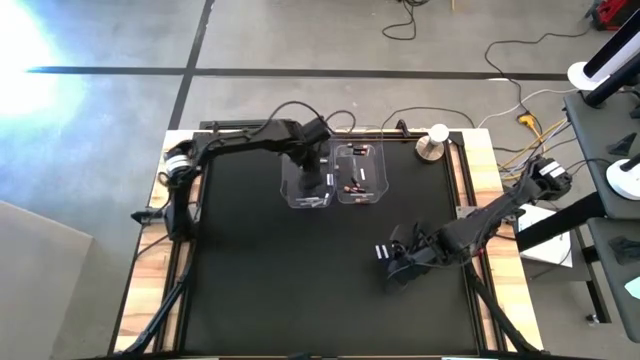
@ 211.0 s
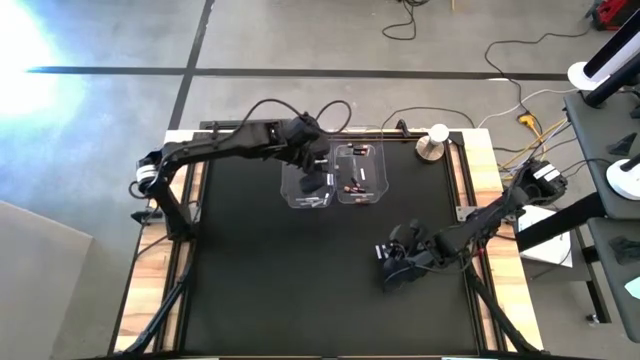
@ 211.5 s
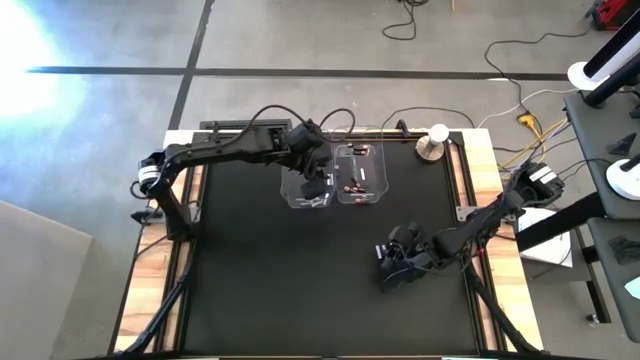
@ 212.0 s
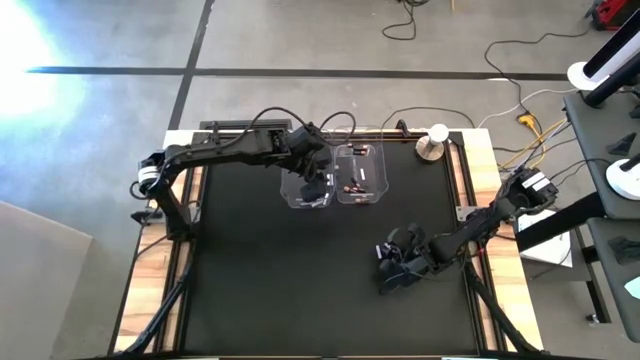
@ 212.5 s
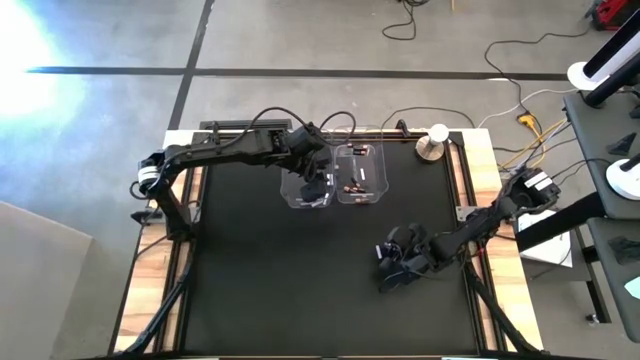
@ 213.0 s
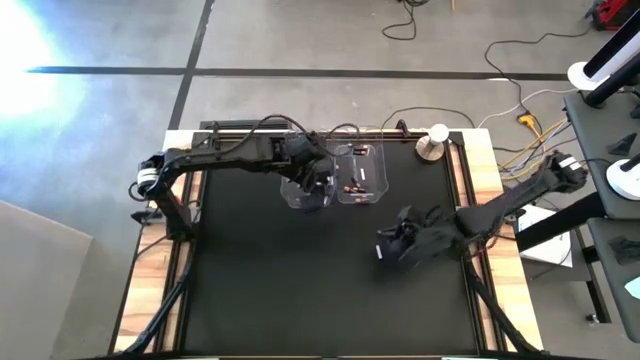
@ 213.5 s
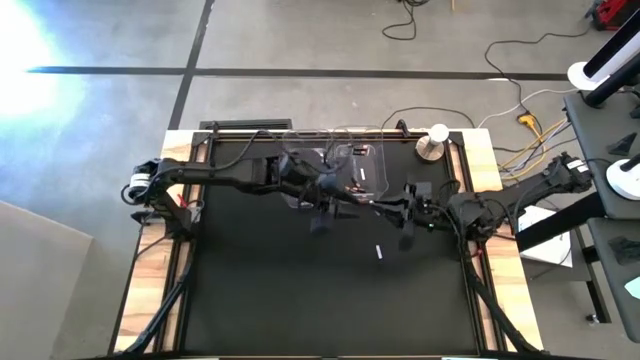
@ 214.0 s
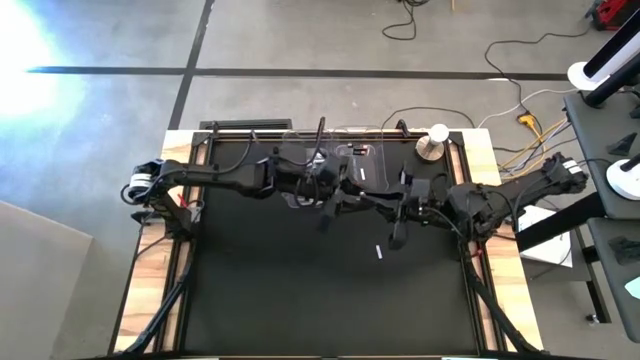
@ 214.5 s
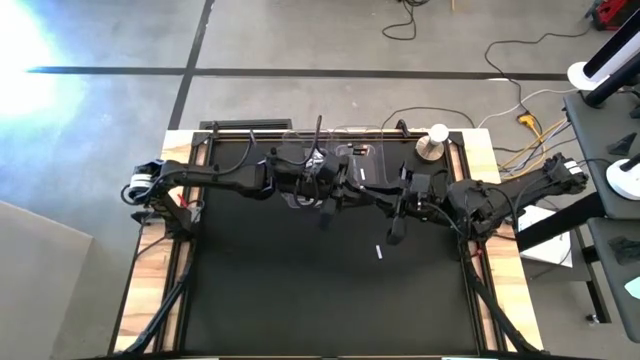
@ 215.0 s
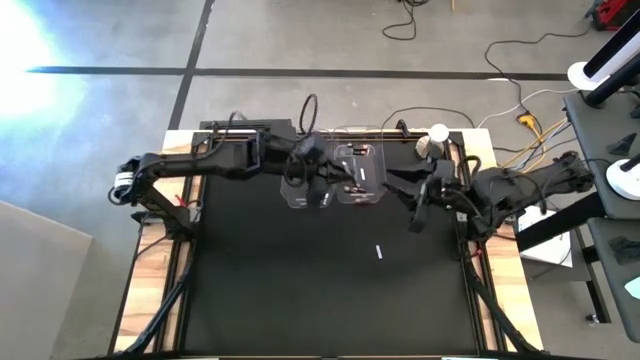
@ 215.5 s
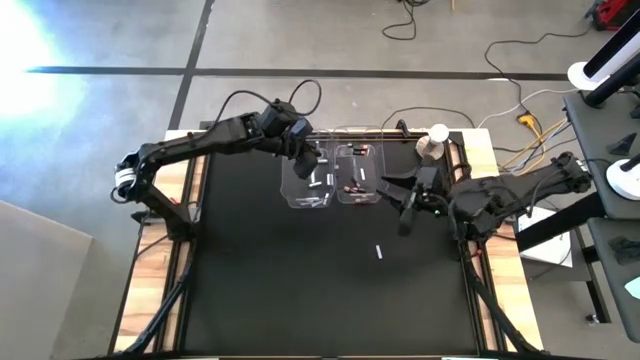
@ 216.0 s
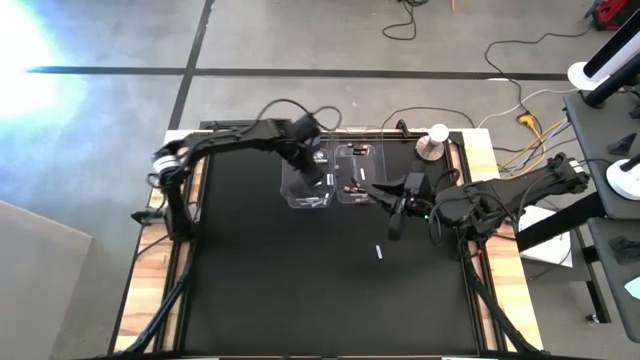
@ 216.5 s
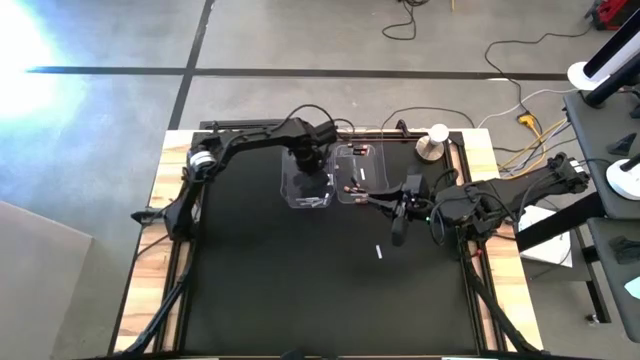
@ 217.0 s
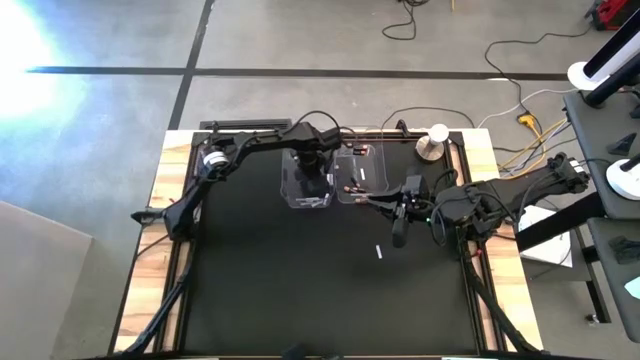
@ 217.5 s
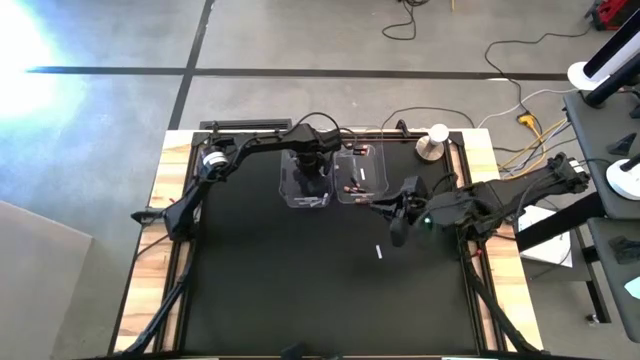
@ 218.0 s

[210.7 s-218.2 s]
Task: Sort batteries
Put the white battery into the left transparent bin

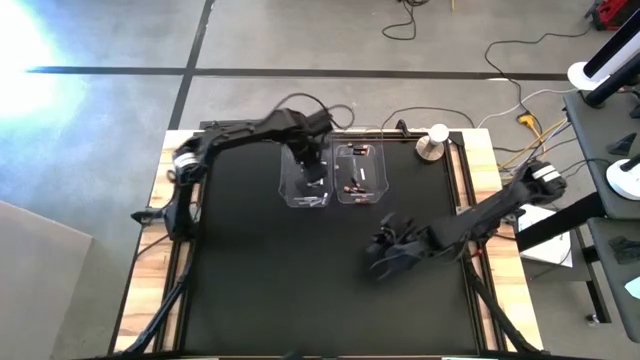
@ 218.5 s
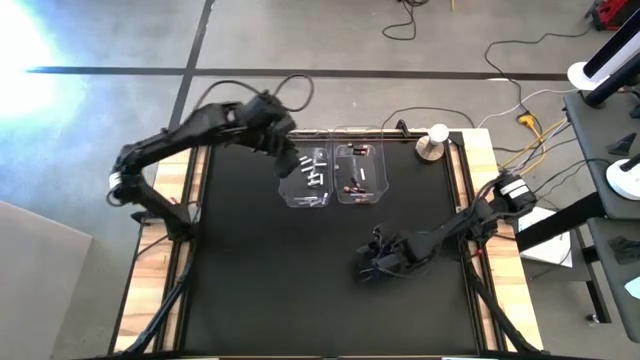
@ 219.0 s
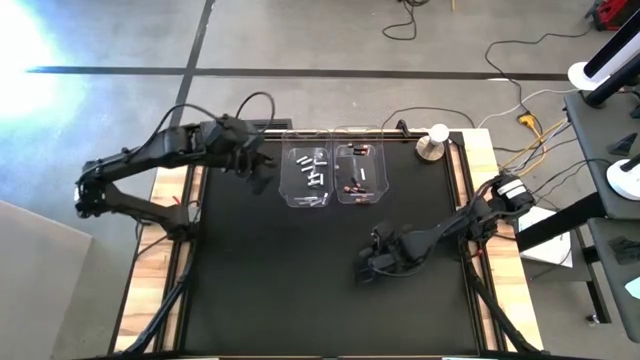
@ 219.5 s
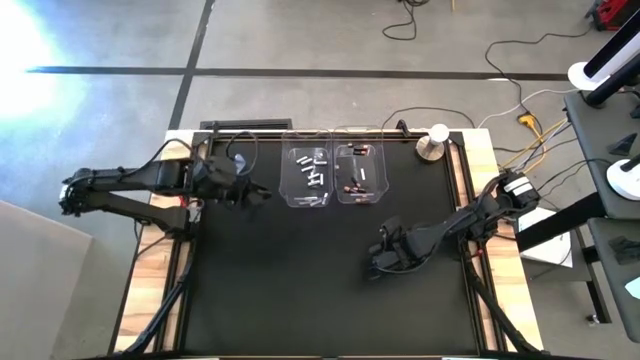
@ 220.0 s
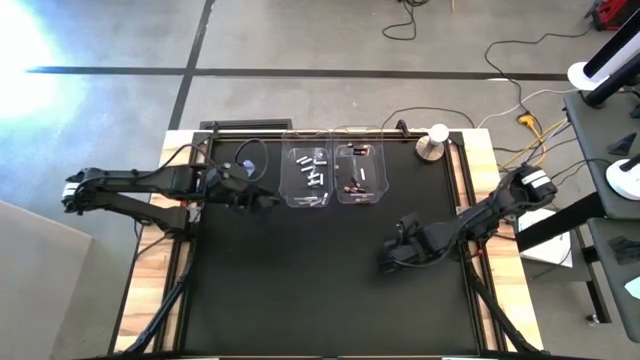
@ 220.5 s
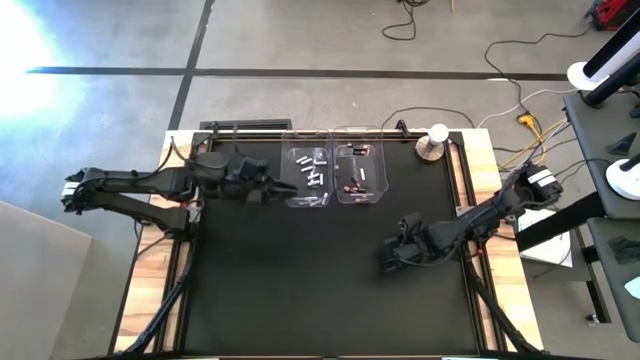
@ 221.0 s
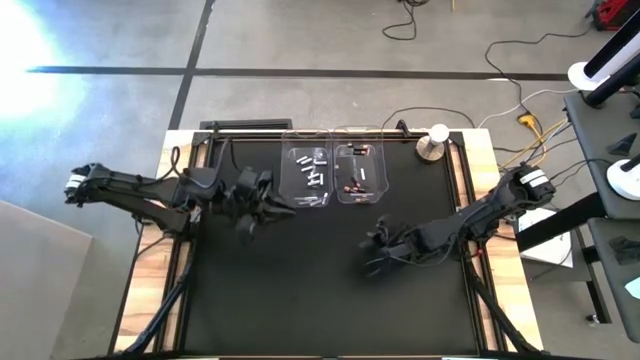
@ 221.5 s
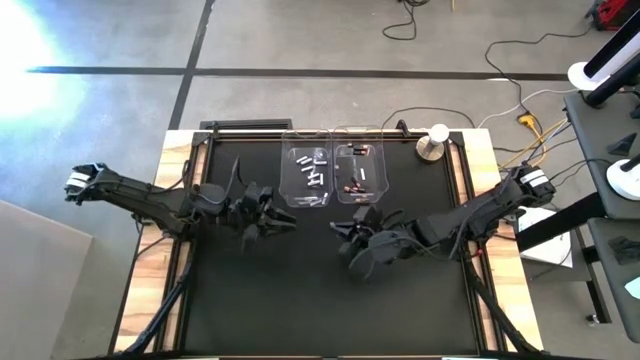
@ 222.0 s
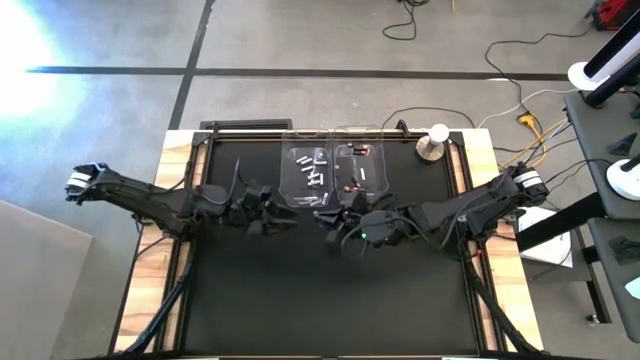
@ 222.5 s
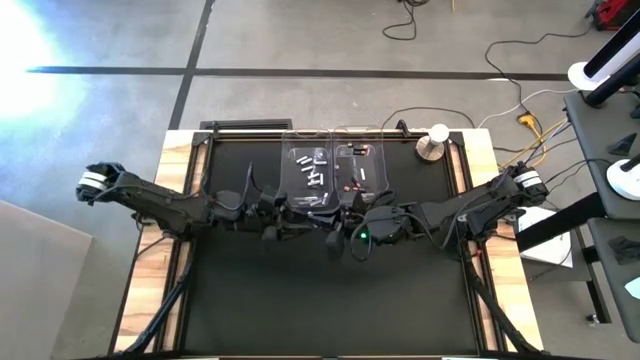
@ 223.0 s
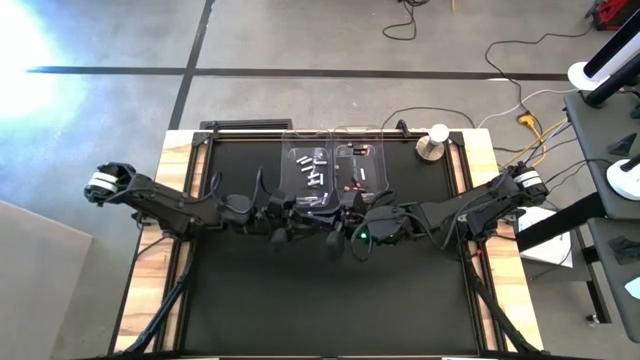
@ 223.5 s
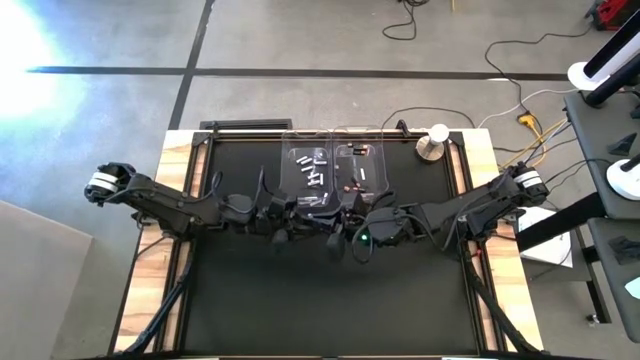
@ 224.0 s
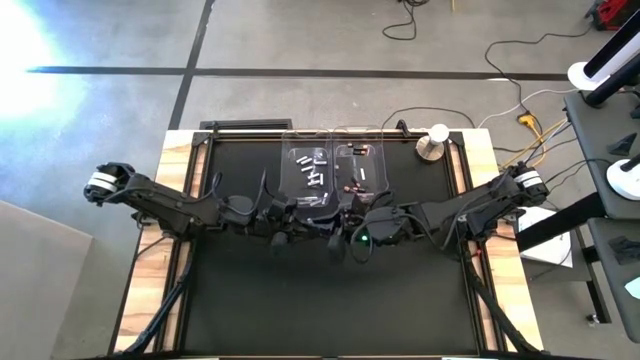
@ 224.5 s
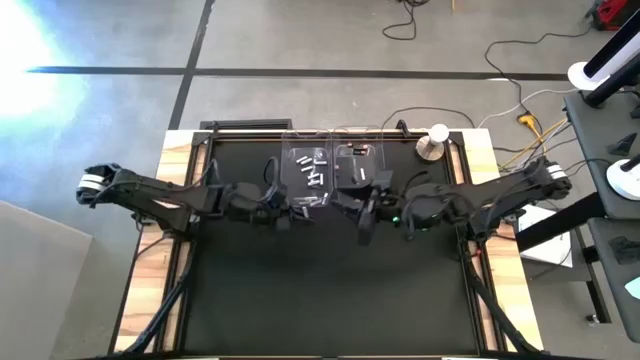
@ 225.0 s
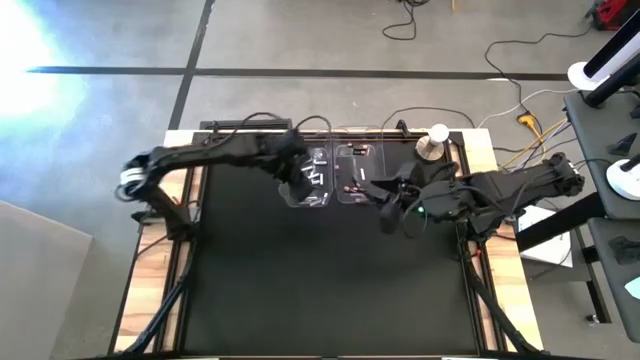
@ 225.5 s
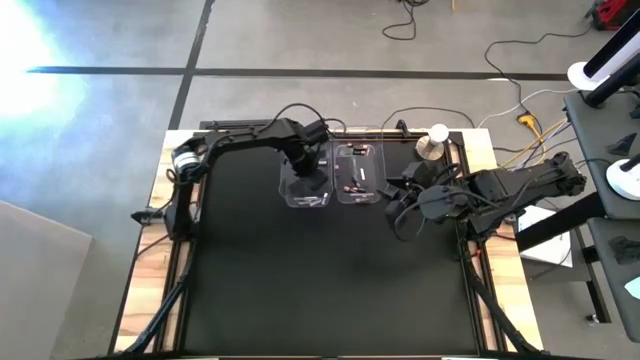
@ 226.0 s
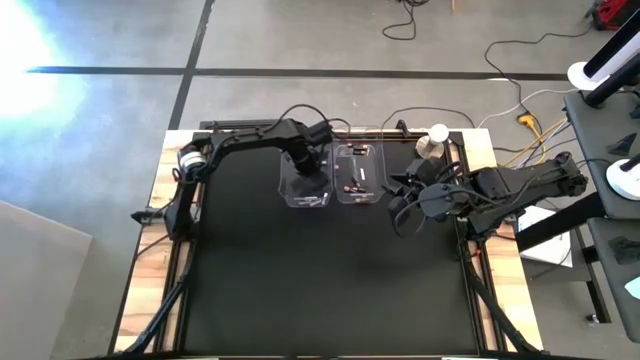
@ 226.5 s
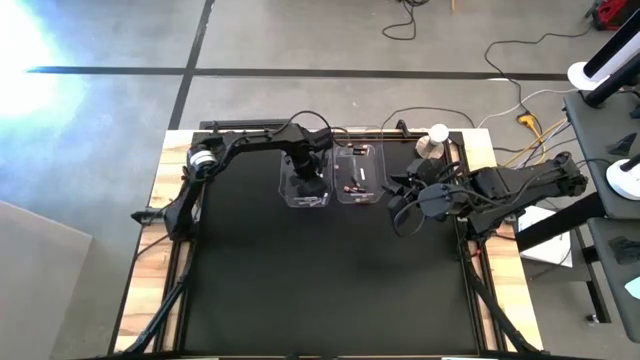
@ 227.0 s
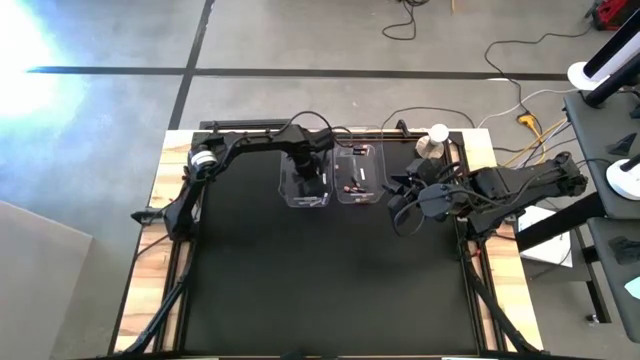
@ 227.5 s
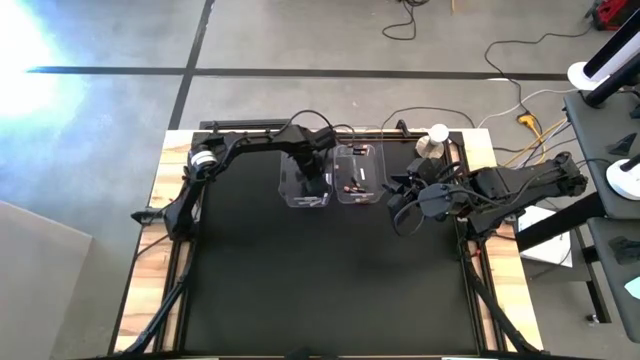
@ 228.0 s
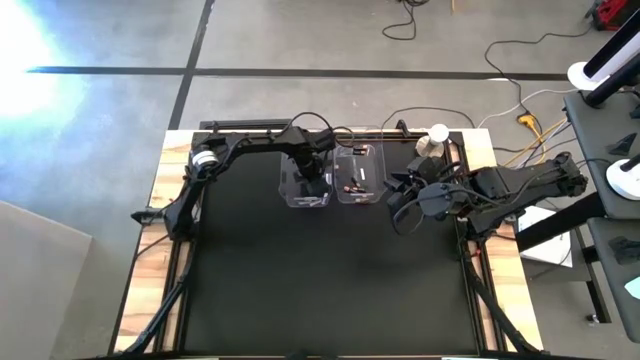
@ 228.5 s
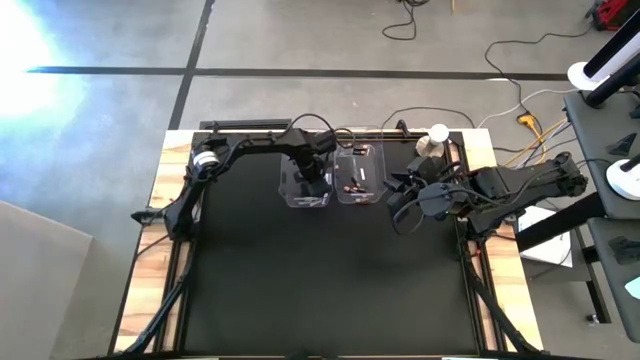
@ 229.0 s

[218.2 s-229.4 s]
Put the white battery into the left transparent bin

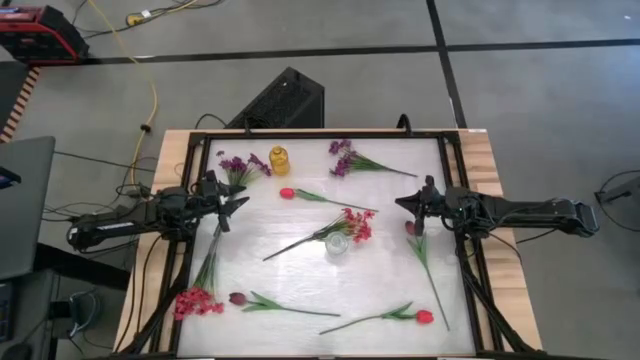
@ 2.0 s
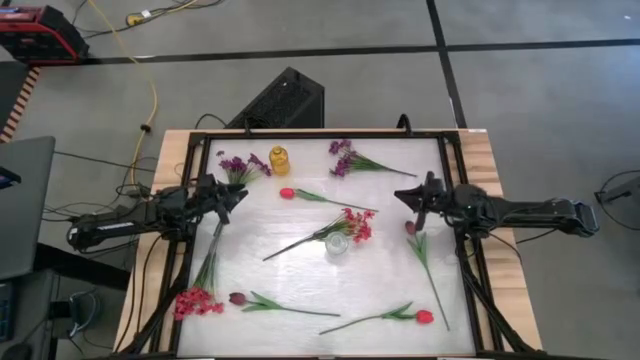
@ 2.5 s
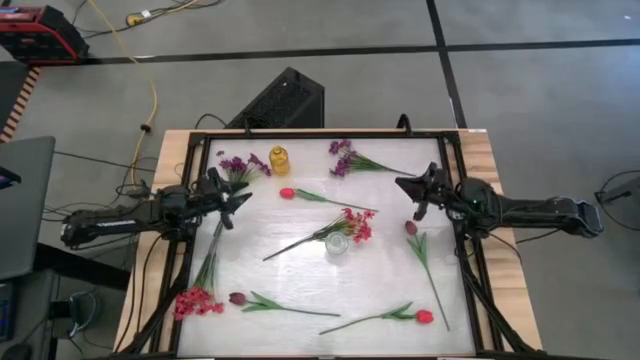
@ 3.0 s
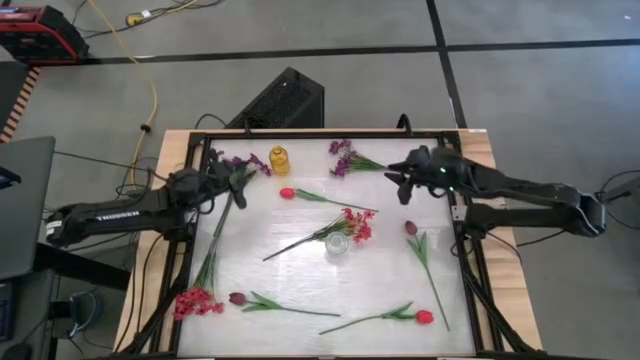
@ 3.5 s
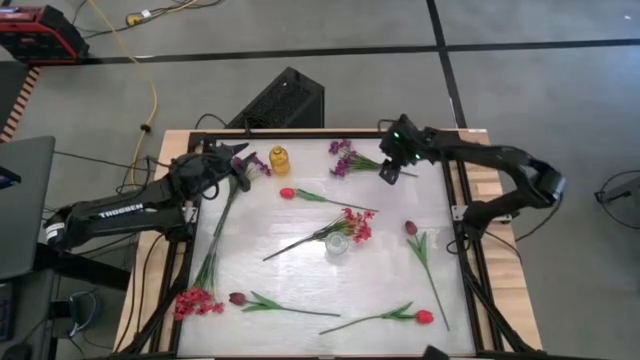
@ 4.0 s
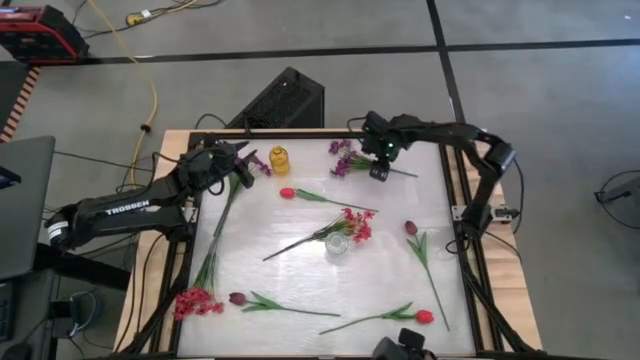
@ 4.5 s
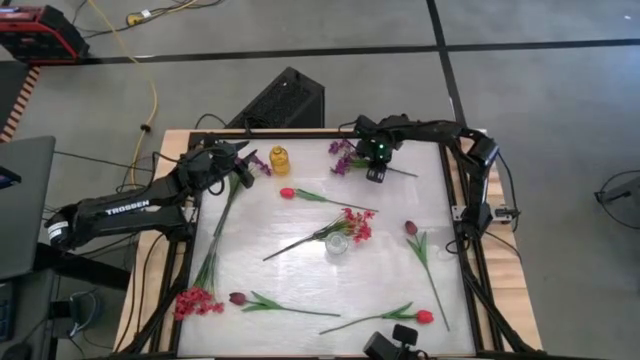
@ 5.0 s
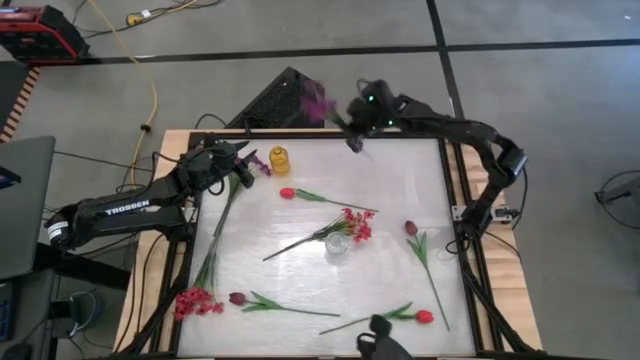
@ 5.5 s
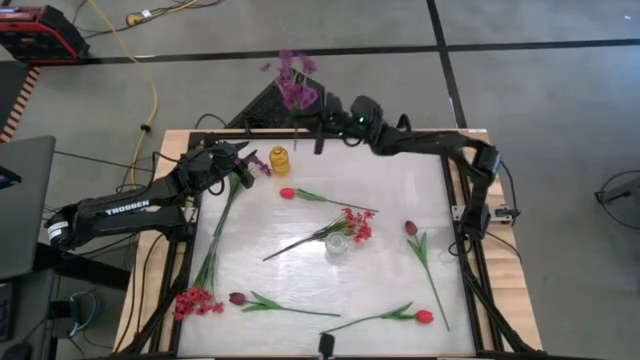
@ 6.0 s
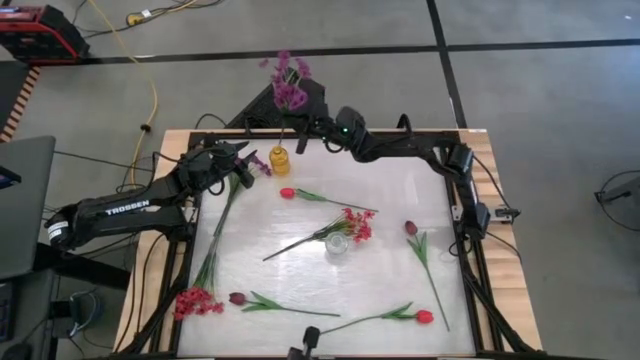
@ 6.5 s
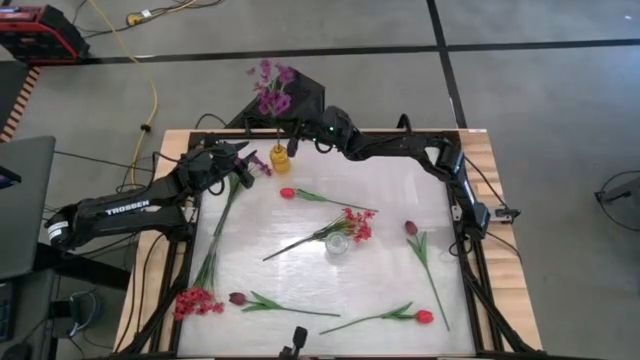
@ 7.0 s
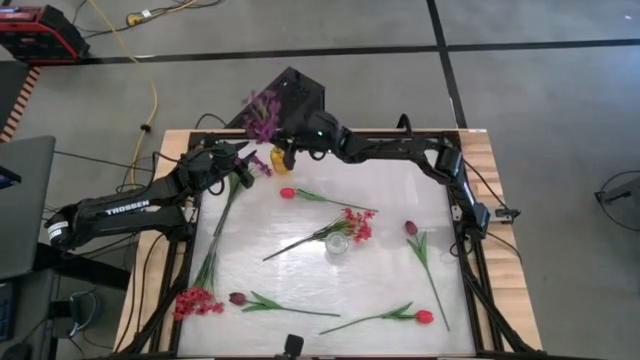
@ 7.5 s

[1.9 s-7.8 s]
Task: Sort flowers into vase by color
Put the right purple flowers into the yellow vase
